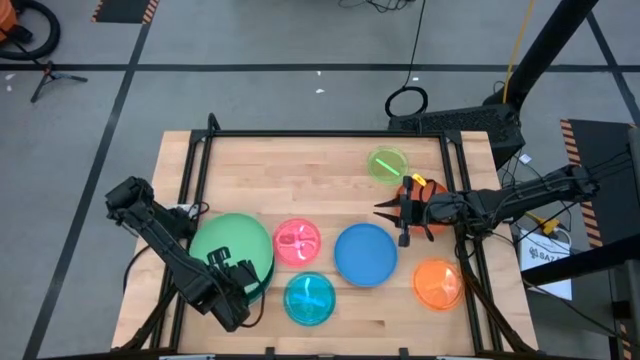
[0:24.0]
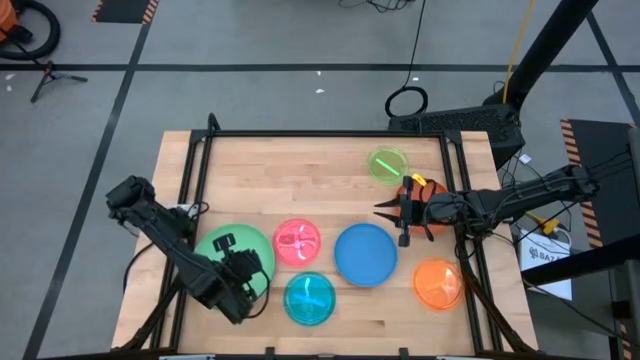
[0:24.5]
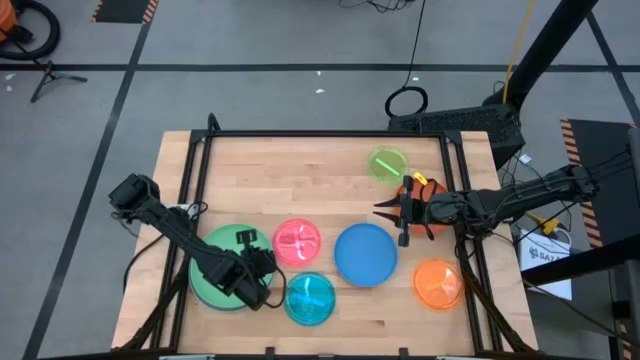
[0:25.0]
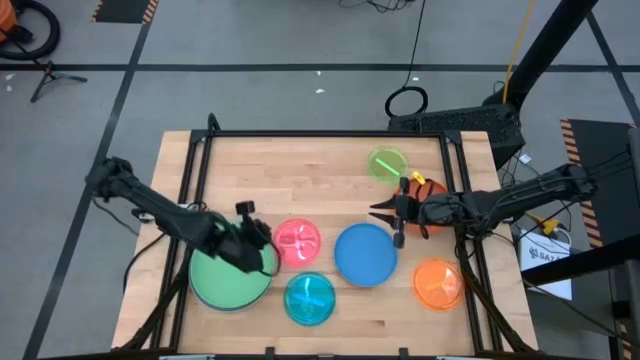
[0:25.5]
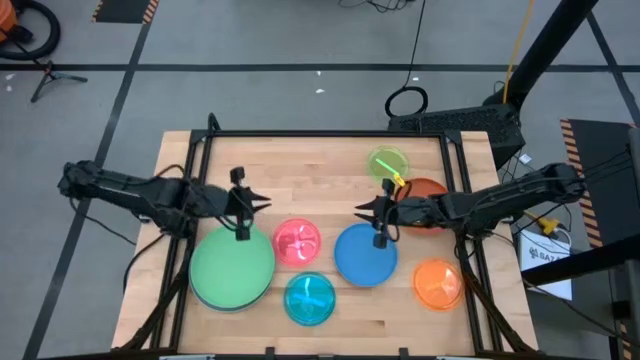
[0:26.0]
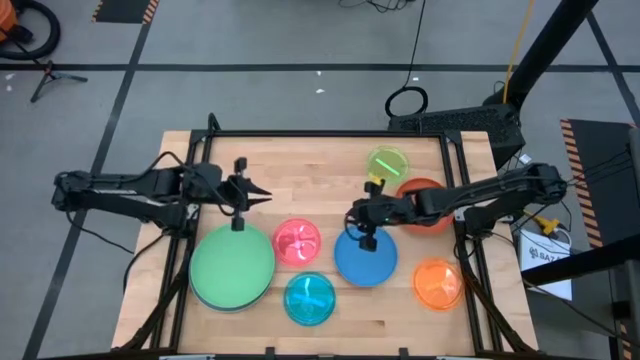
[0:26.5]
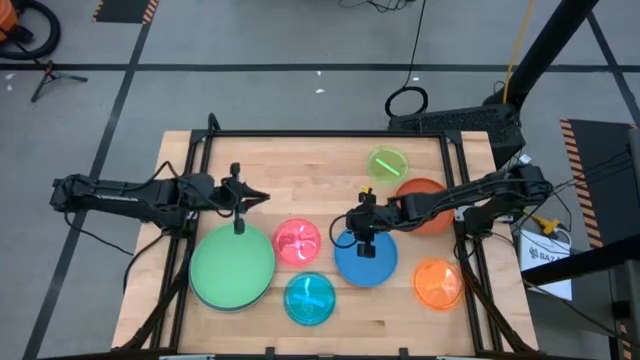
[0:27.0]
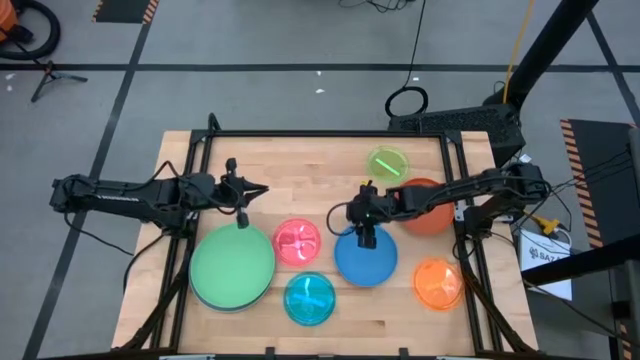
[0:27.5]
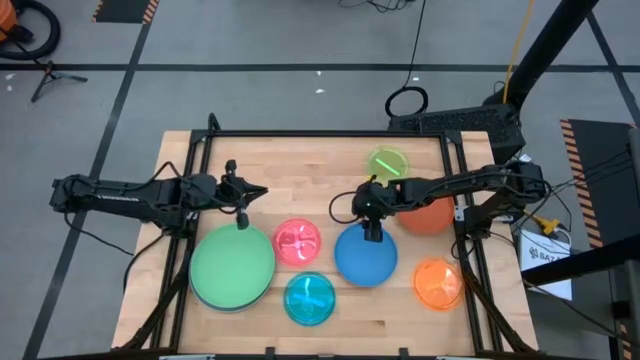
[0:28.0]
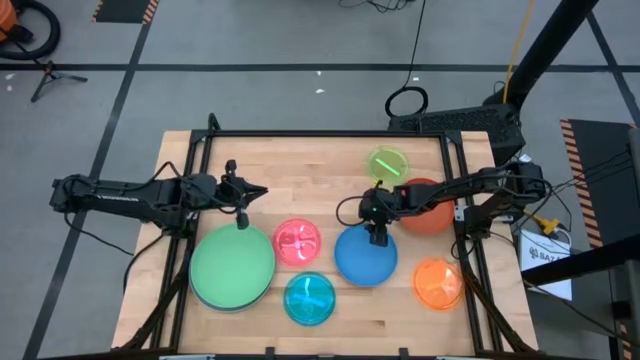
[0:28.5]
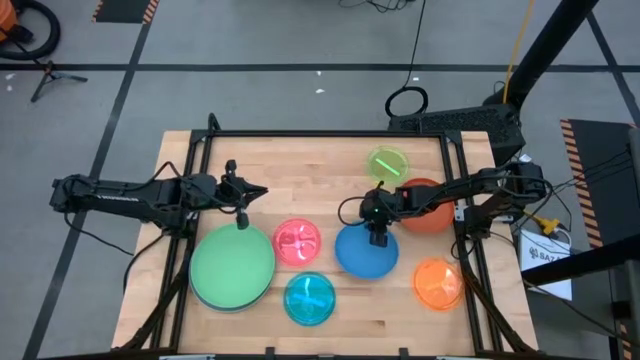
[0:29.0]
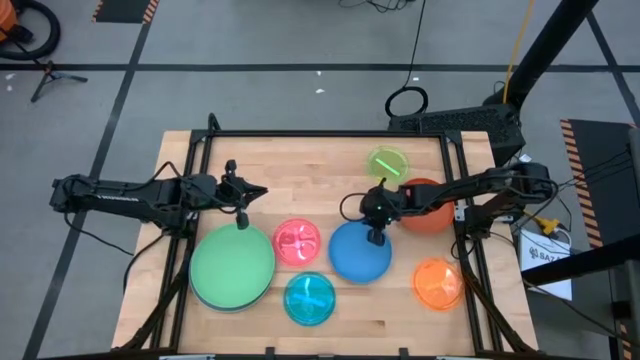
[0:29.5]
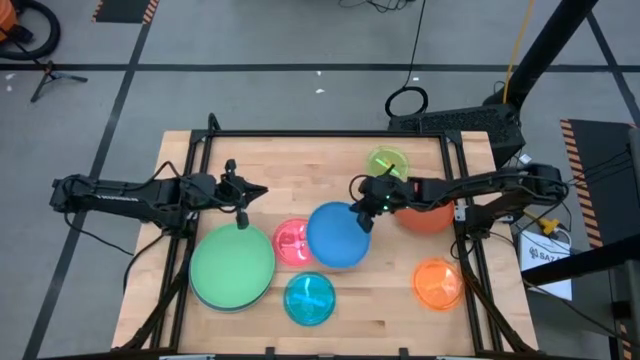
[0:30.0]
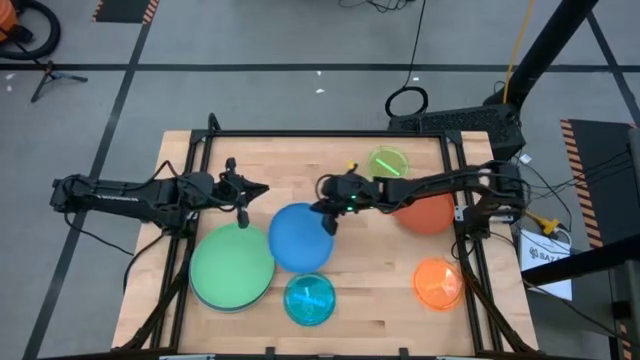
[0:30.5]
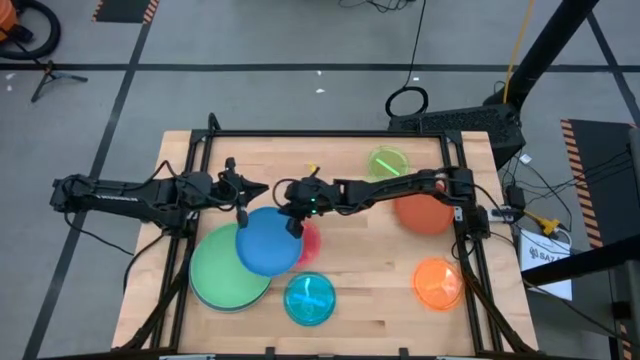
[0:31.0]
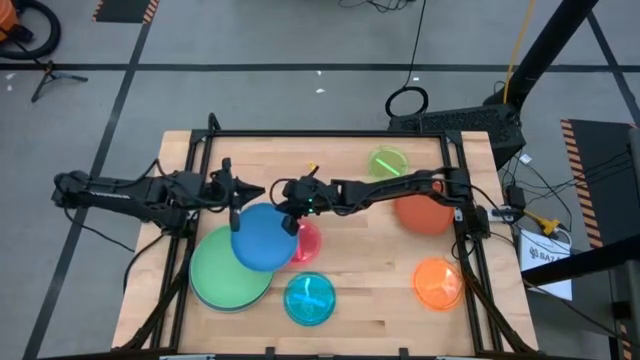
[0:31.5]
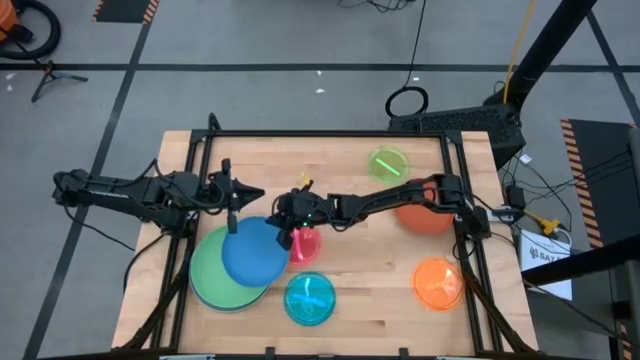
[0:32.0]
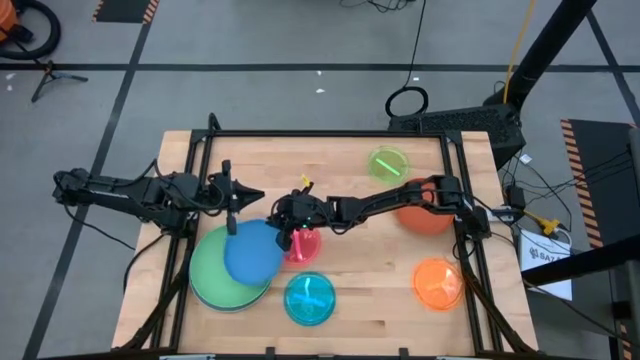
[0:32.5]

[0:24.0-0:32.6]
Task: Stack plastic plates
Stack the dark blue plate on top of the green plate

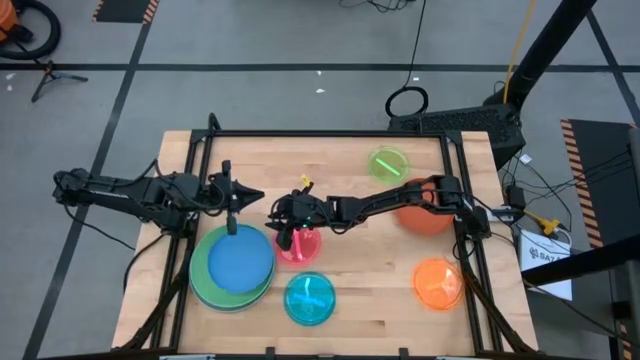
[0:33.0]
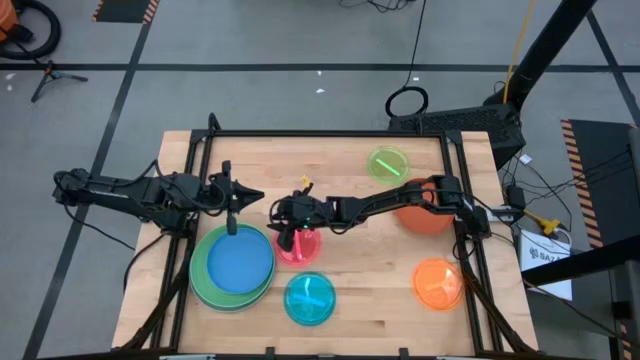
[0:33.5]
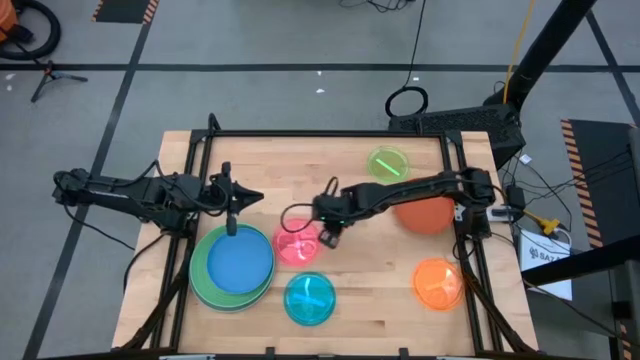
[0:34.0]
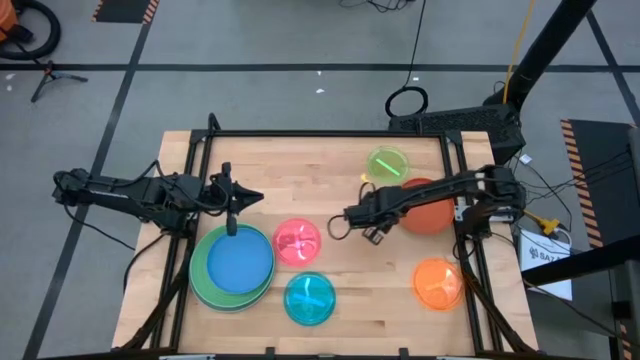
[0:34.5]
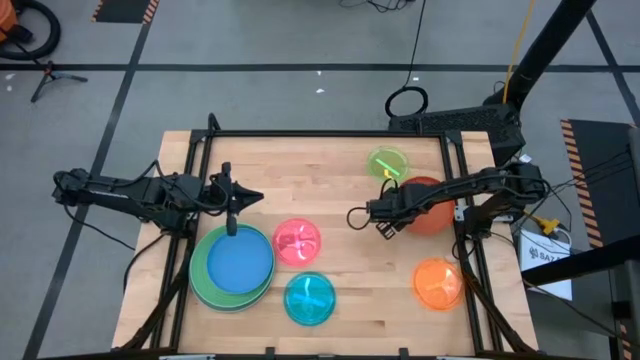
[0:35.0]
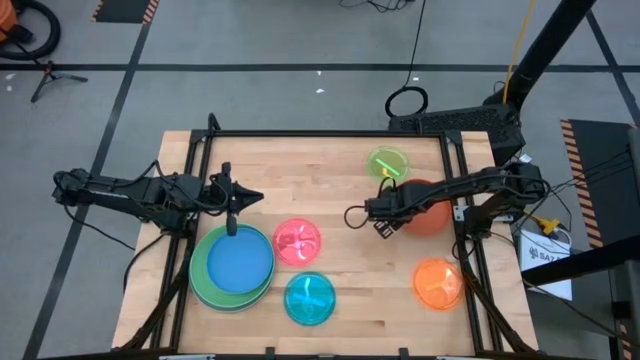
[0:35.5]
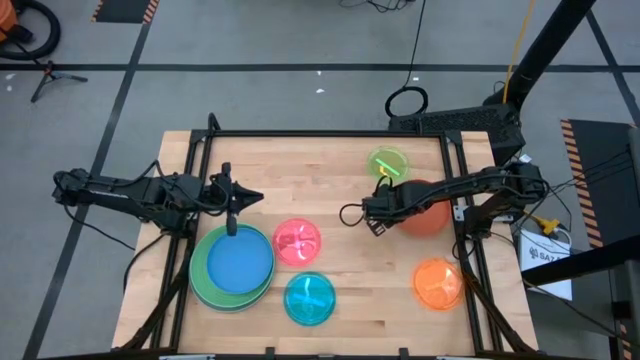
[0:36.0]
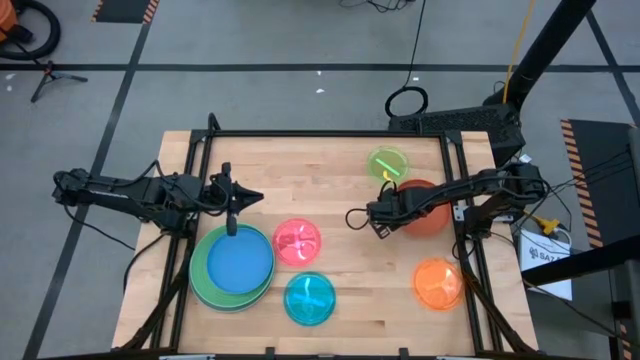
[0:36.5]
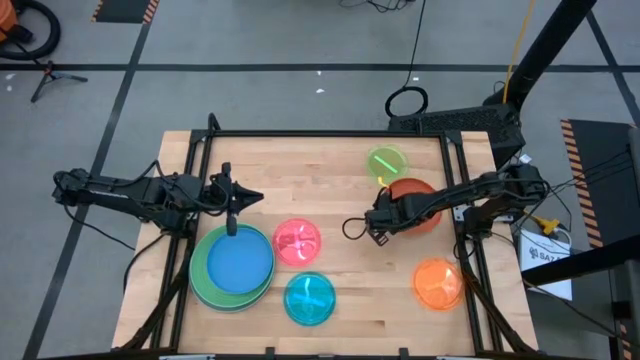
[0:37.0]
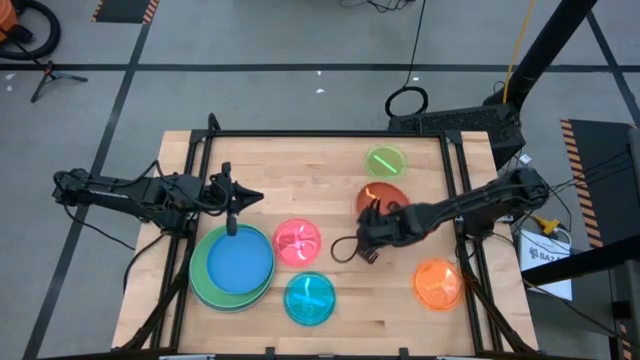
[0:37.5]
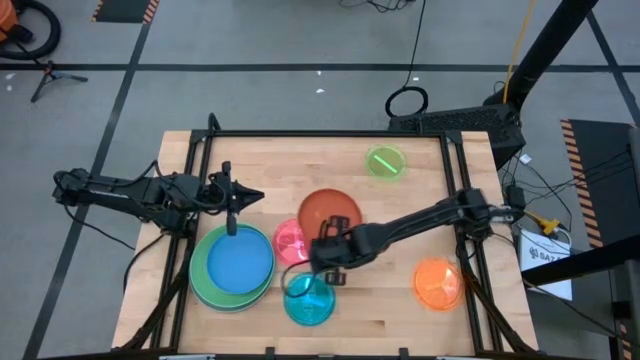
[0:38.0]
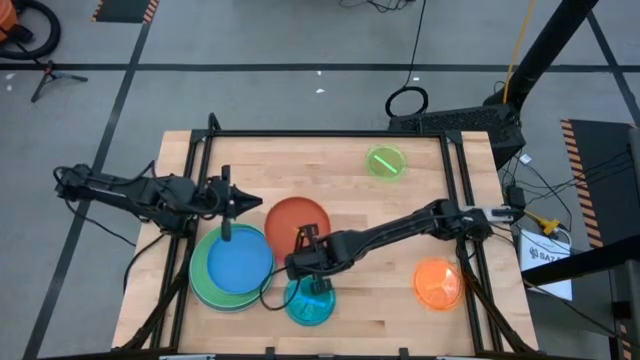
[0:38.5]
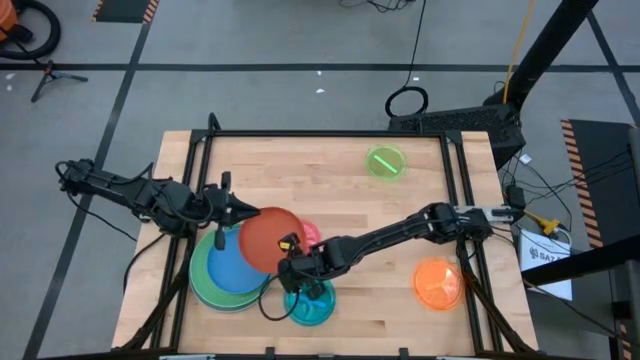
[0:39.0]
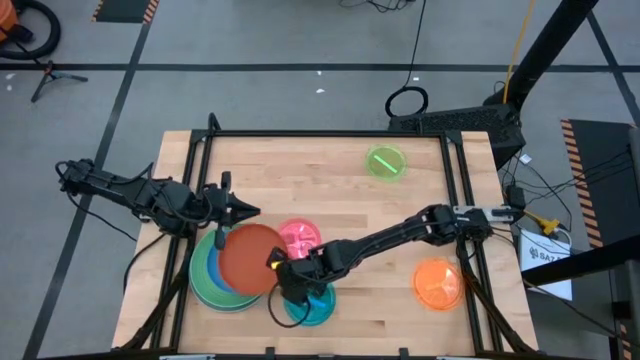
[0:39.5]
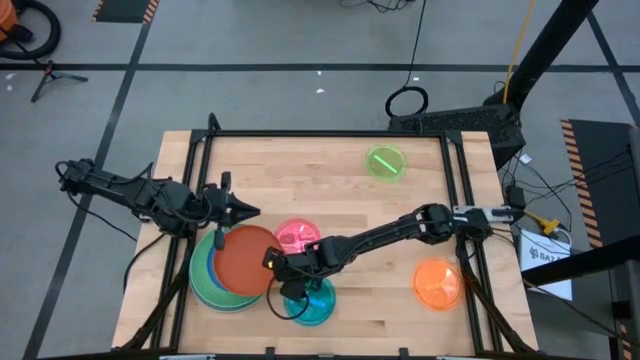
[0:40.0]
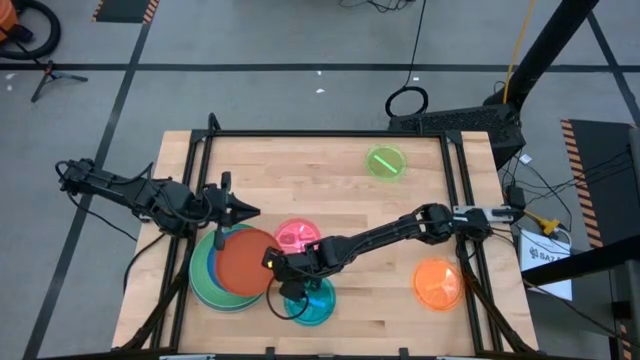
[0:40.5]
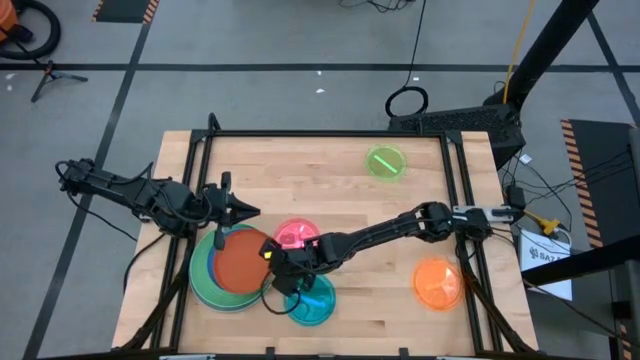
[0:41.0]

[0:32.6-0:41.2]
Stack the dark orange plate on top of the dark blue plate

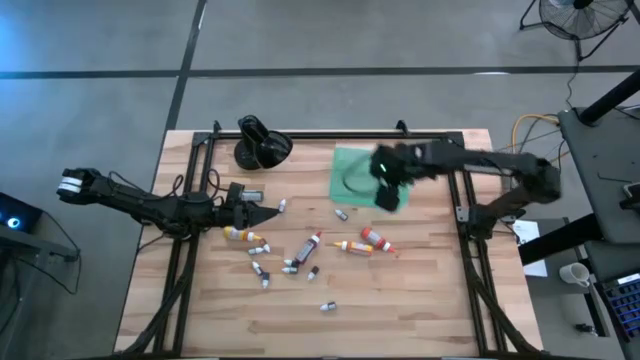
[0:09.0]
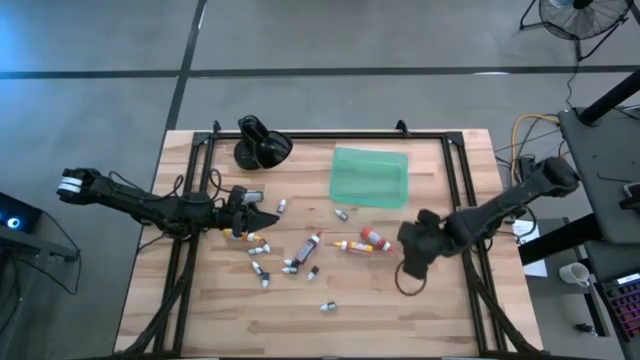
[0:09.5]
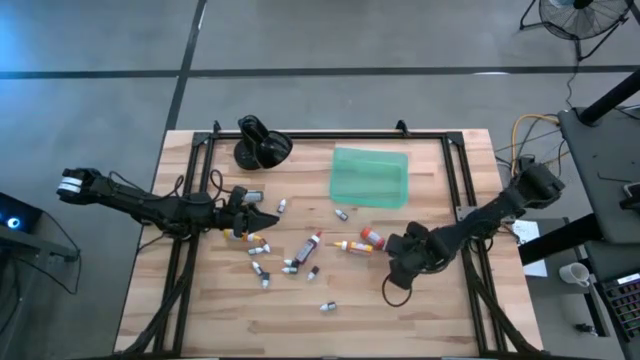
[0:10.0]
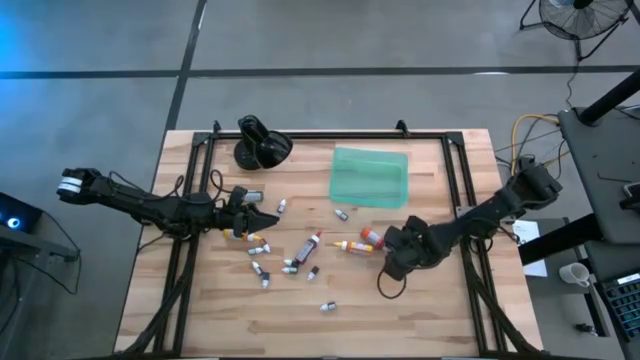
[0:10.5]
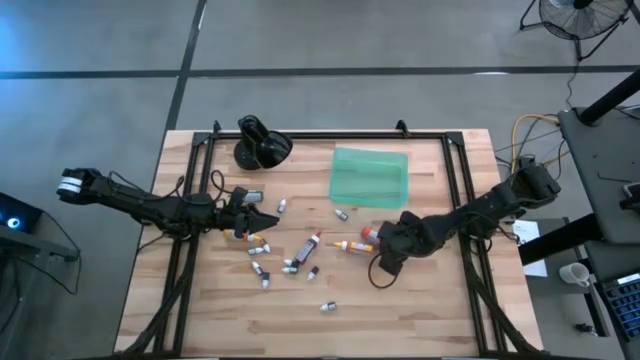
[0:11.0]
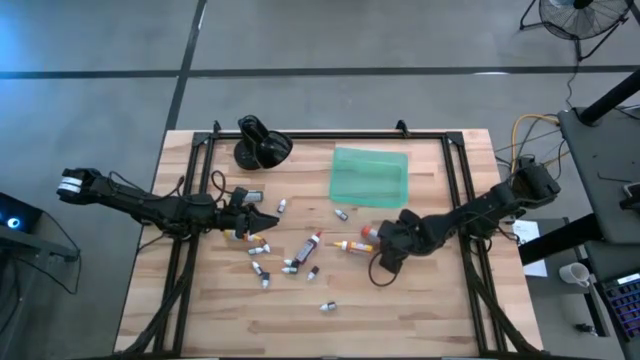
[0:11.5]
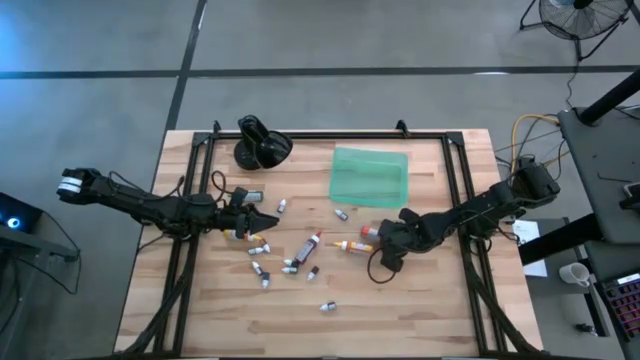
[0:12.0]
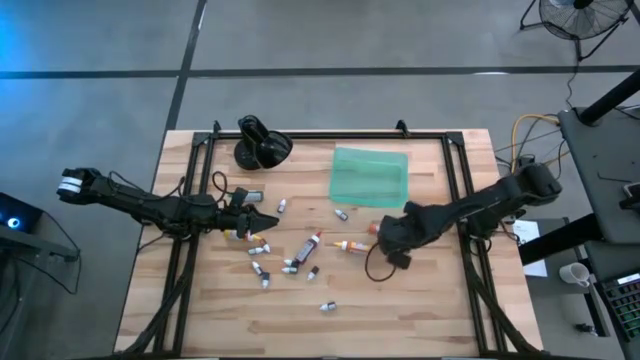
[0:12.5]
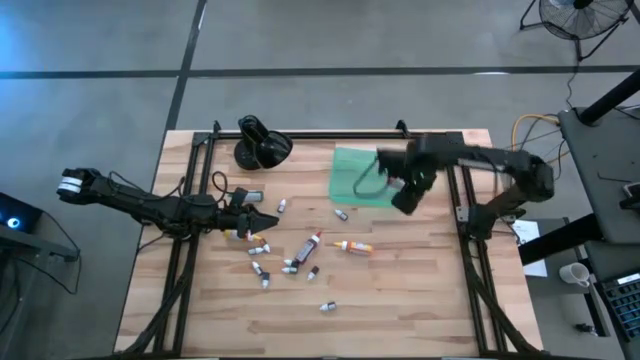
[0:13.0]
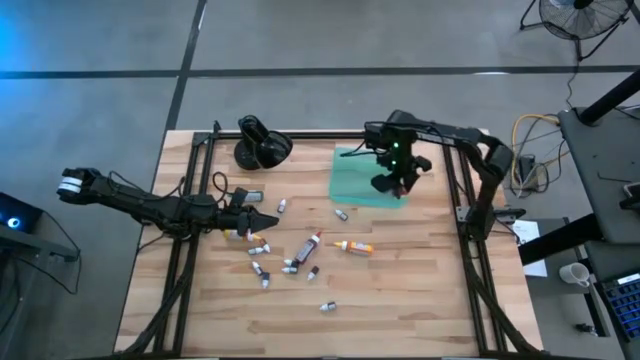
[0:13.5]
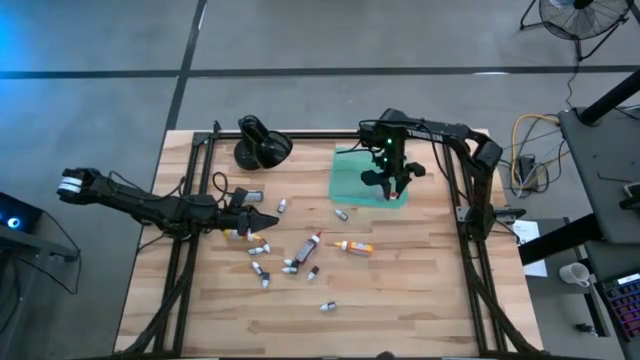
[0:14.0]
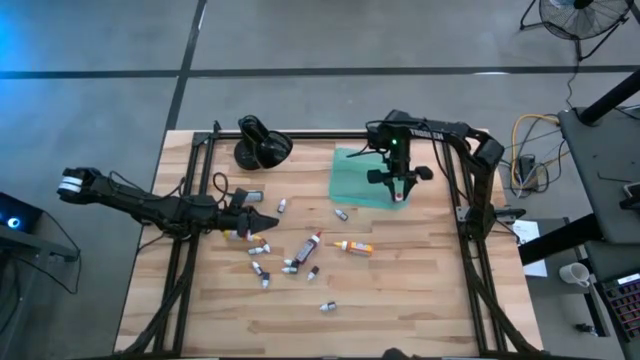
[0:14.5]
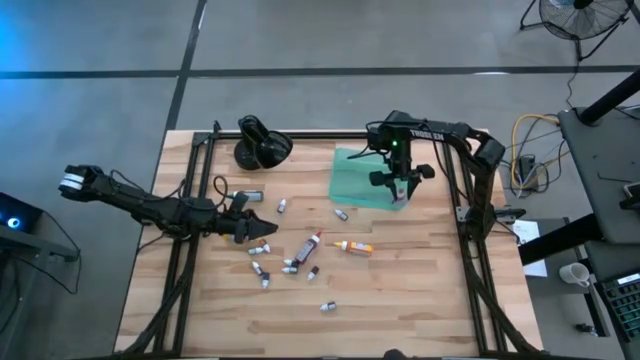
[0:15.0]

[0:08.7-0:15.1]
Task: Pick & Place food coloring
Put the large orange food coloring bottle into the green bin
